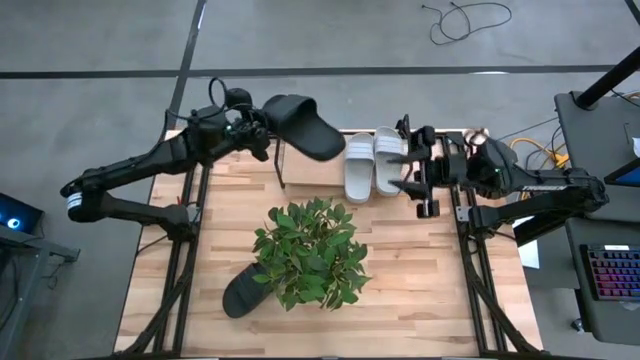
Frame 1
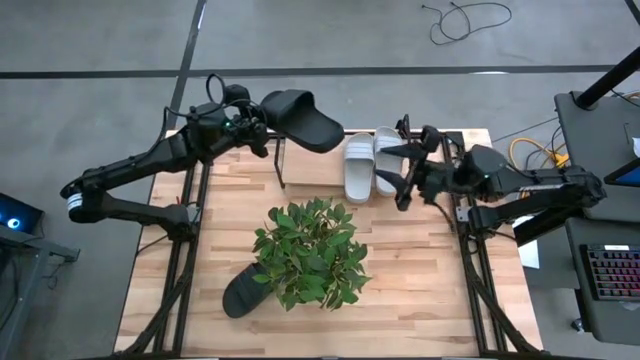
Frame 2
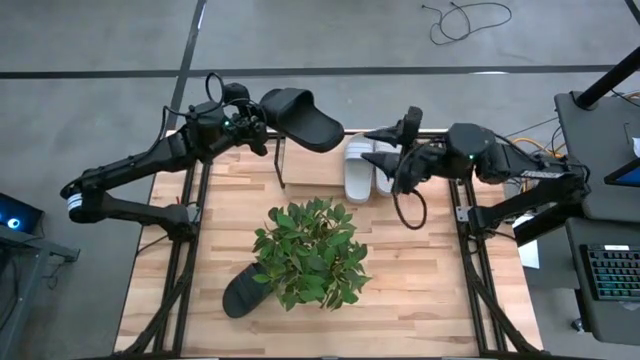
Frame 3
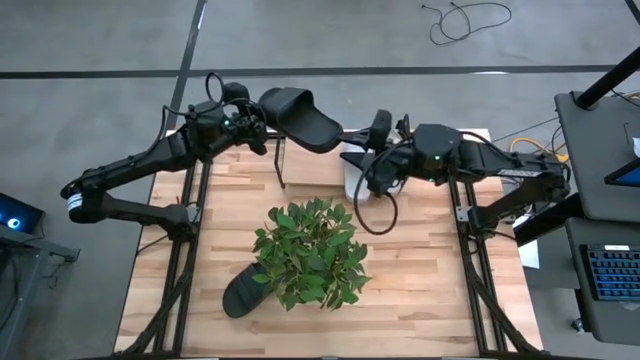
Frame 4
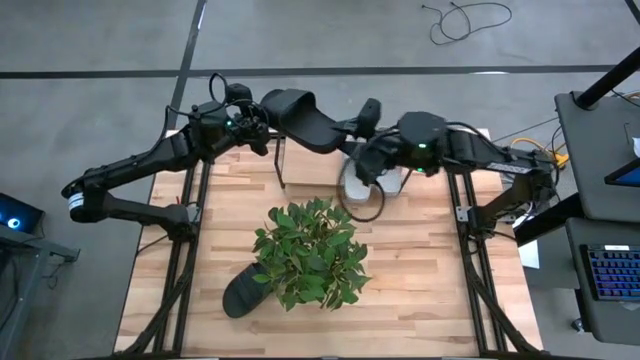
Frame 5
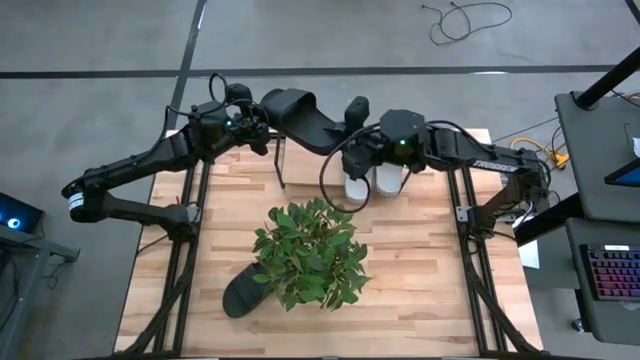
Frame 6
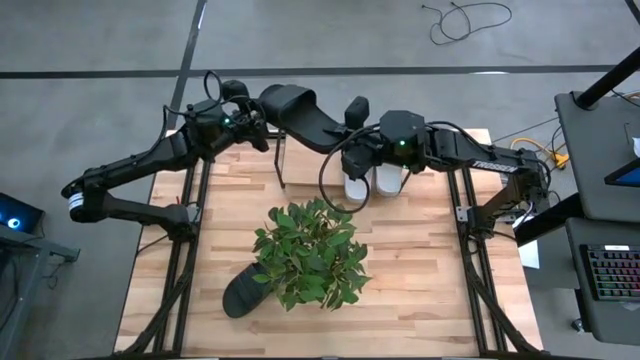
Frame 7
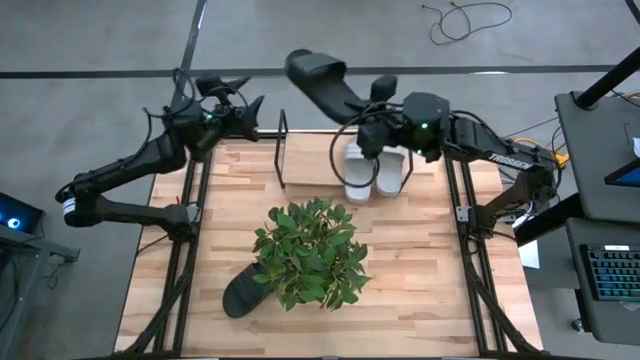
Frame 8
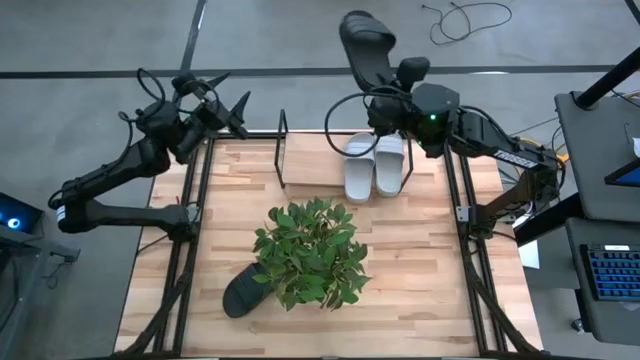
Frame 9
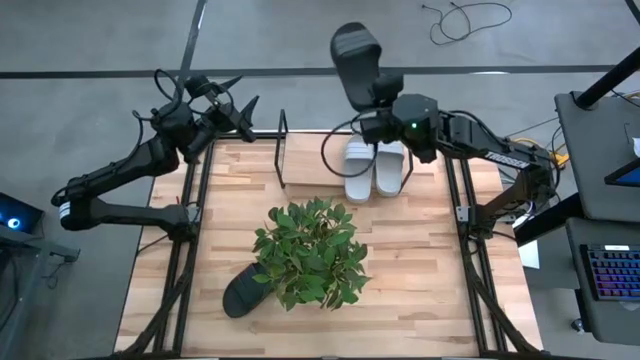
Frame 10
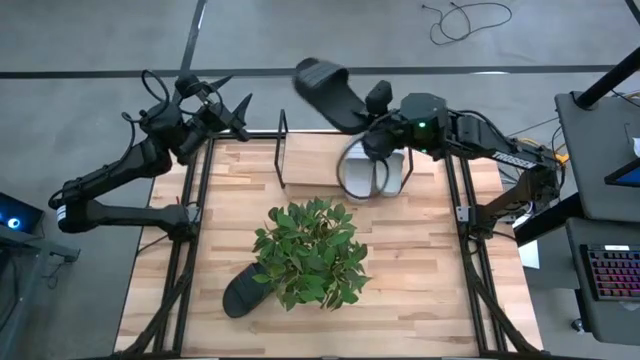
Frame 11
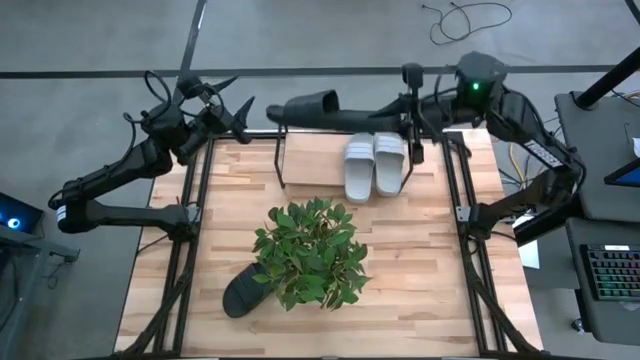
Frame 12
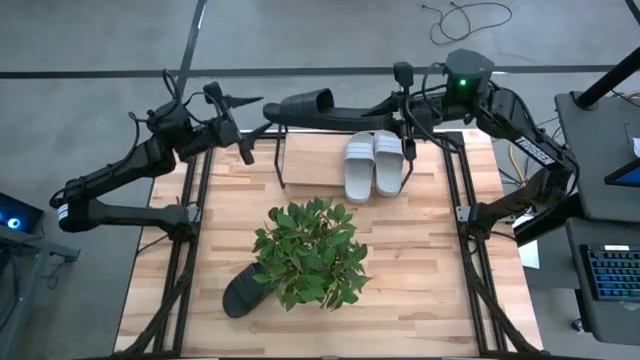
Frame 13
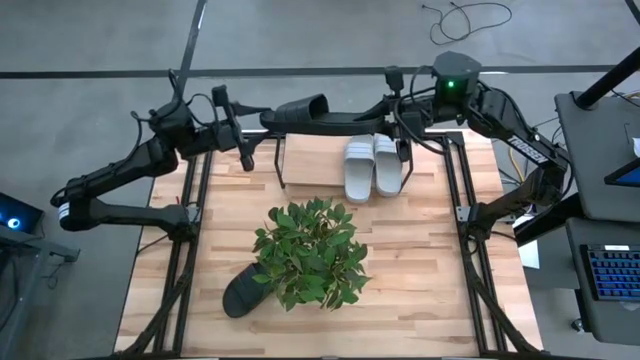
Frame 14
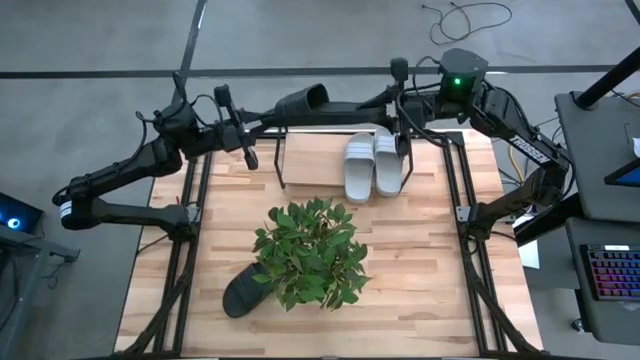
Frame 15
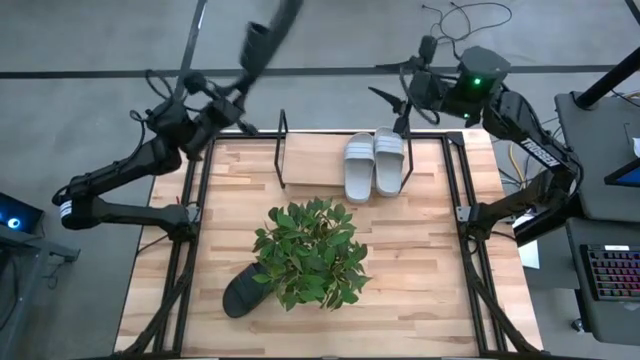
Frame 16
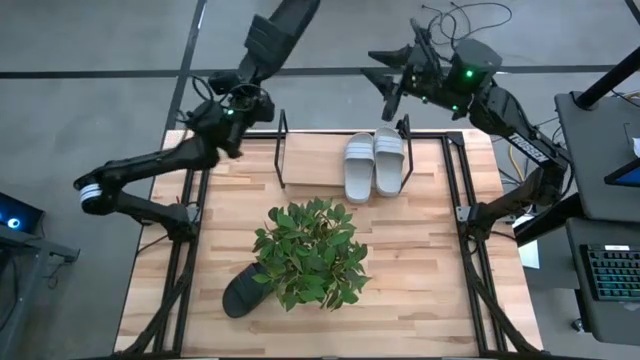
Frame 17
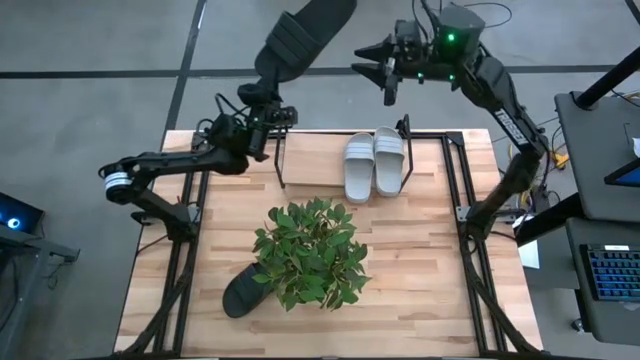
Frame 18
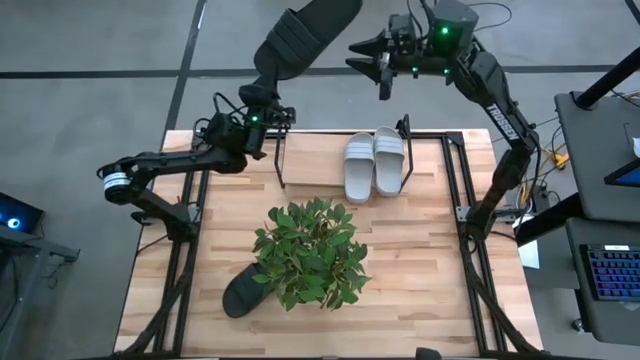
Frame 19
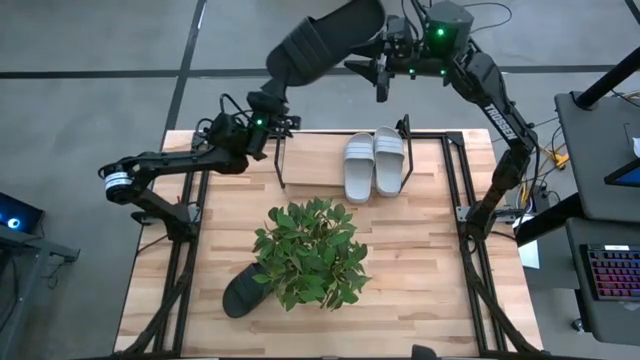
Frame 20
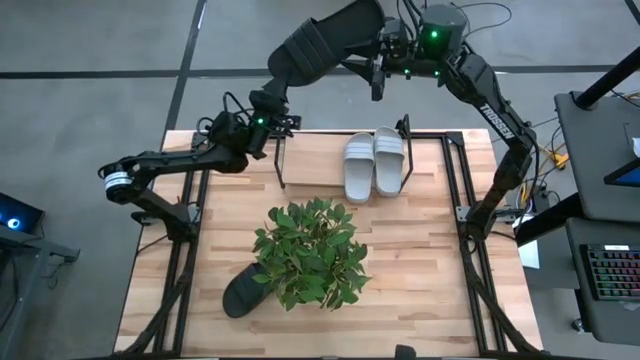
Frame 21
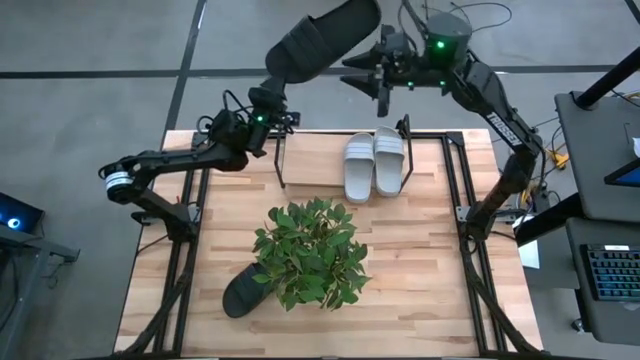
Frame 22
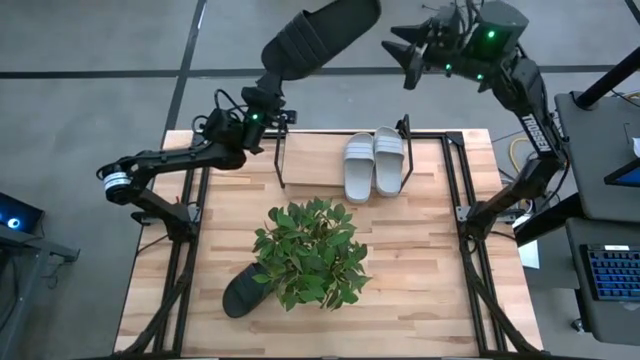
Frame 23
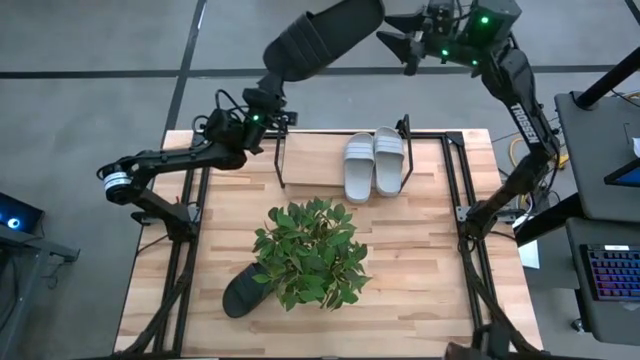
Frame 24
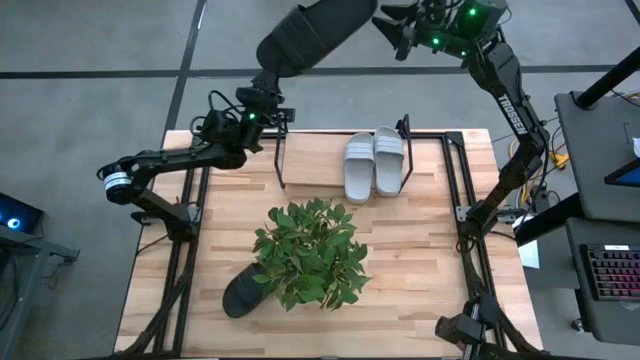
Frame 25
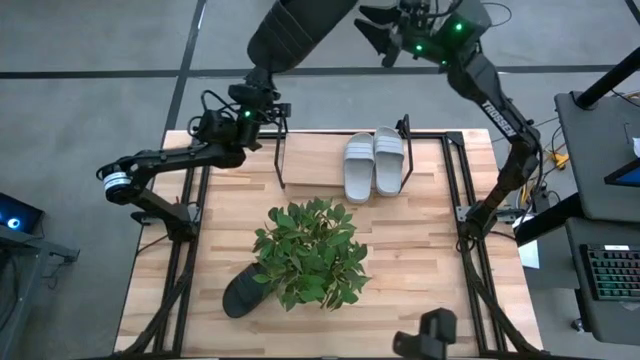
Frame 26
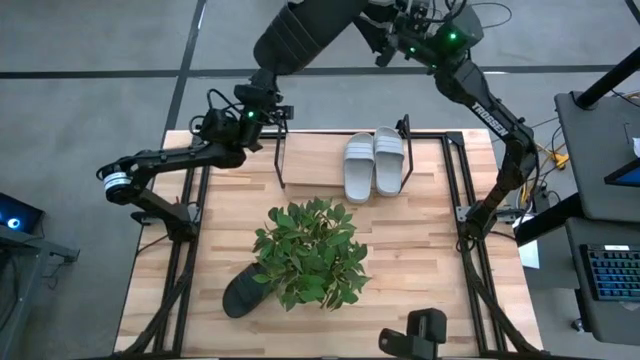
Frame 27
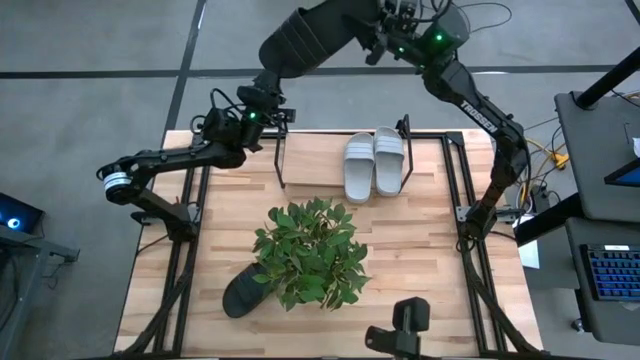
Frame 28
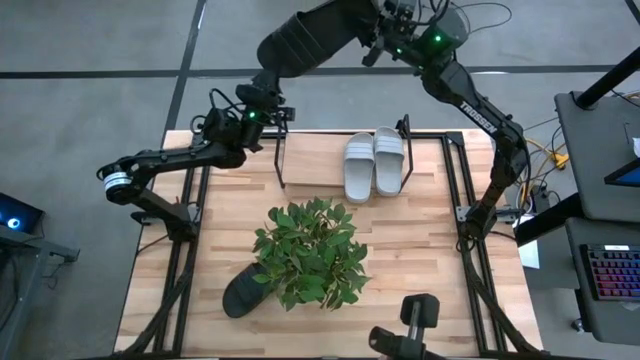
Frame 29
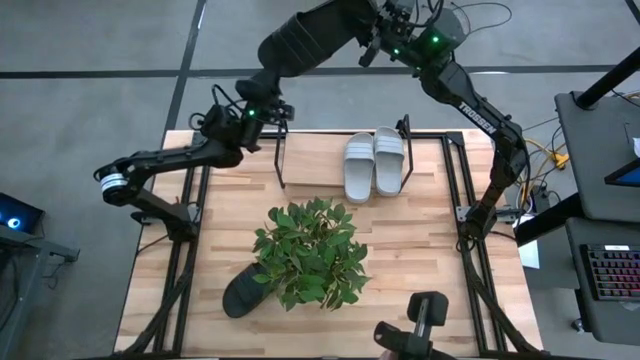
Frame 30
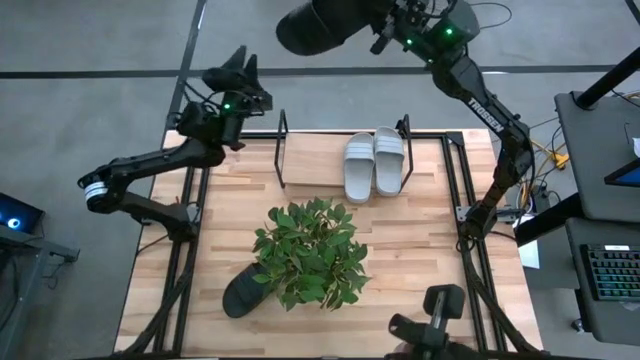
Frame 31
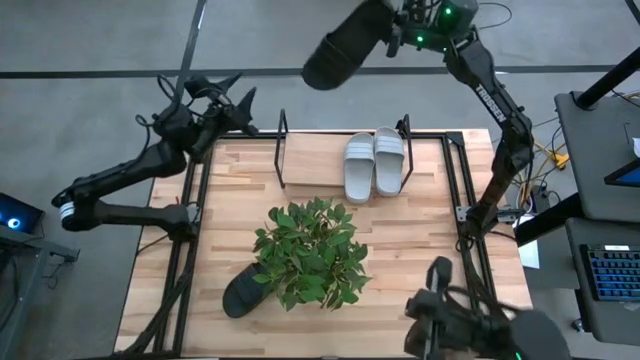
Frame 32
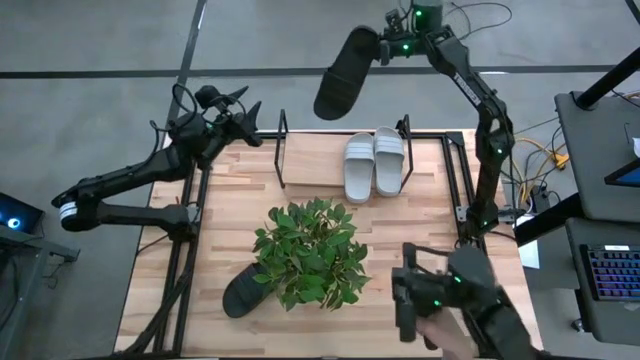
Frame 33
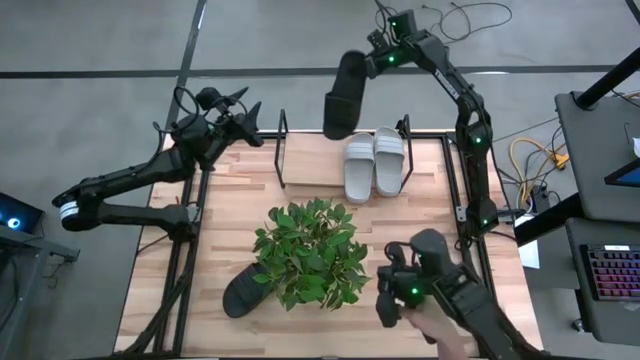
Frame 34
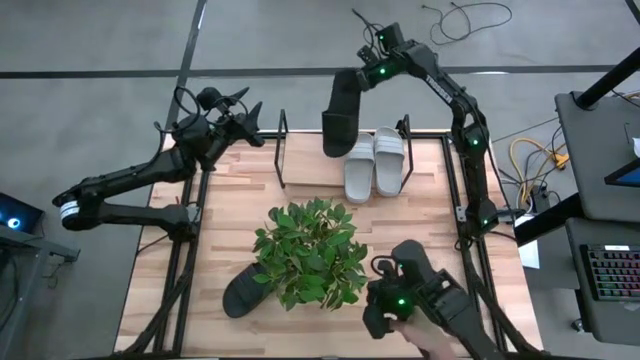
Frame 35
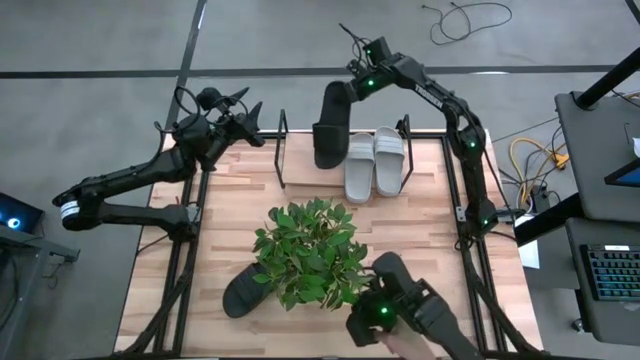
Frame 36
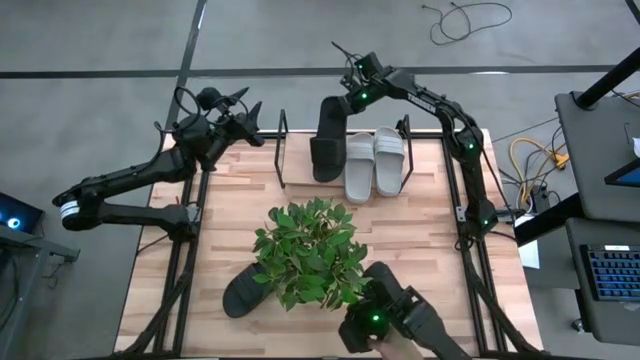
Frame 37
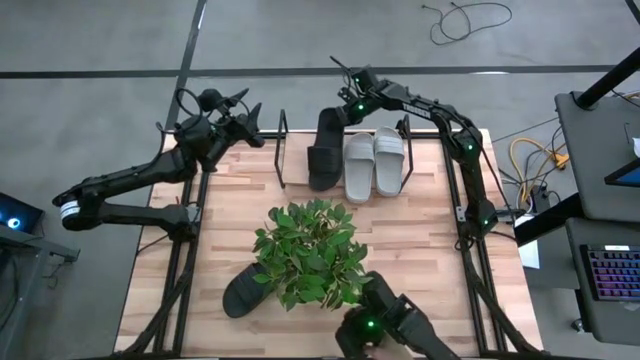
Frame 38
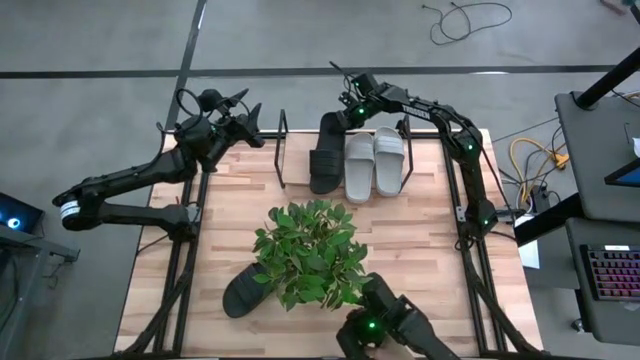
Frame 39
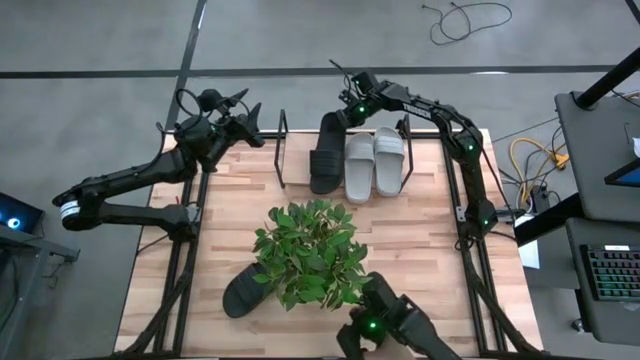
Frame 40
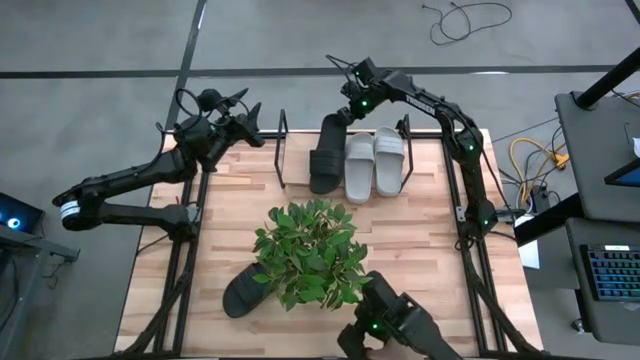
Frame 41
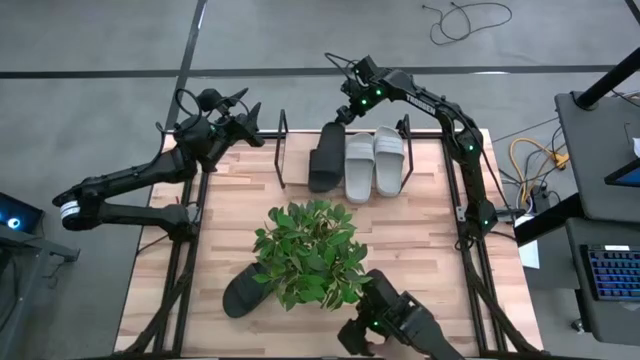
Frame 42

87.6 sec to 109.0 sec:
Task: Pick and place slides into the shelf
Put the right black slide on the shelf

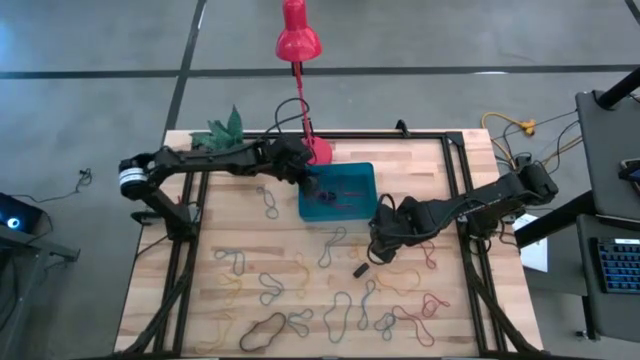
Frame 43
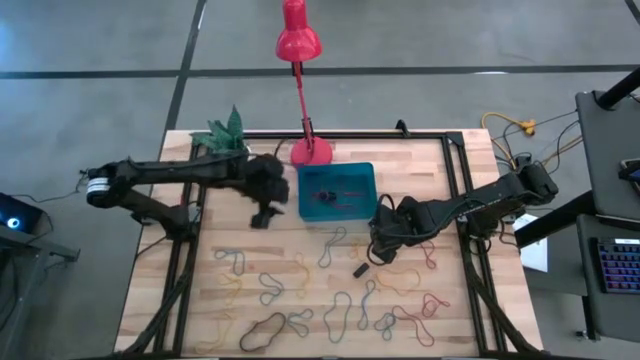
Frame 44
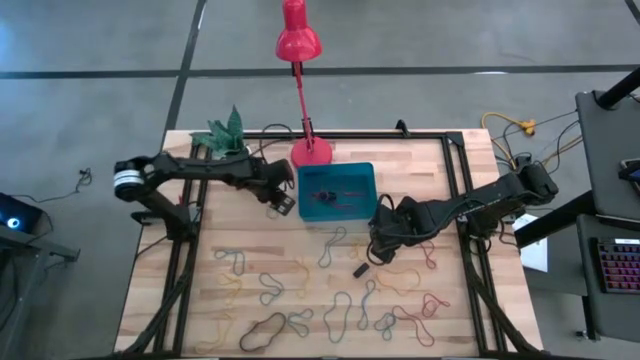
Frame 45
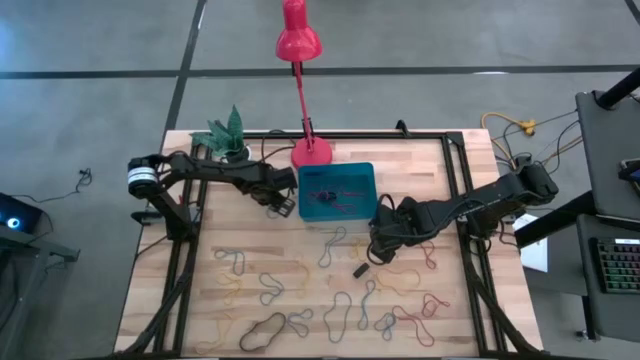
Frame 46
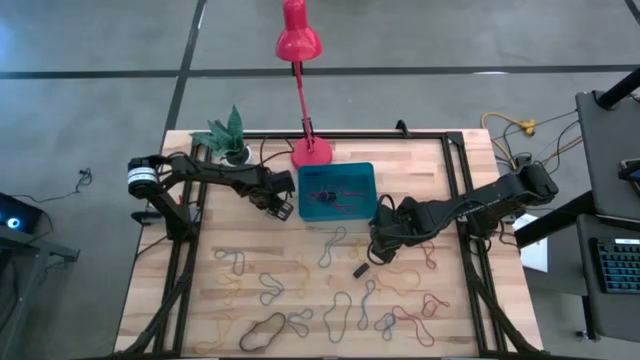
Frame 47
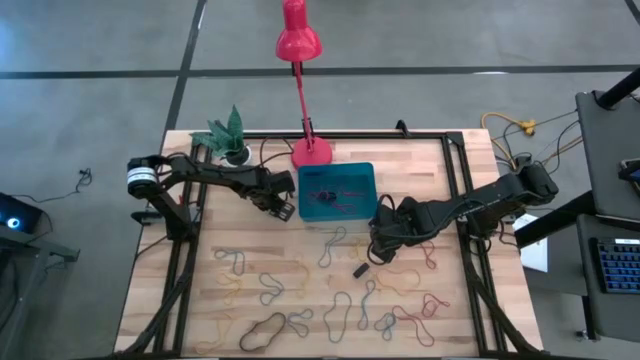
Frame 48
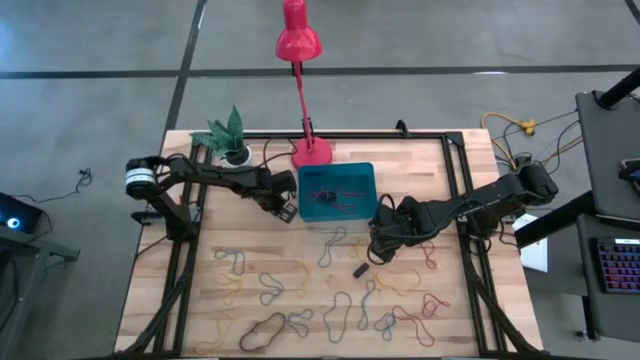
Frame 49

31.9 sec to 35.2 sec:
Task: Pick and place rubber bands into bin
Put the blue rubber band into the blue bin
